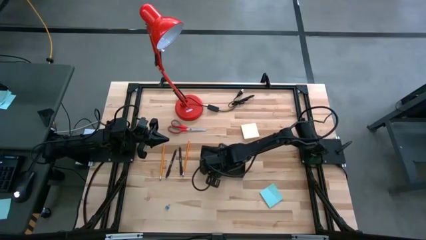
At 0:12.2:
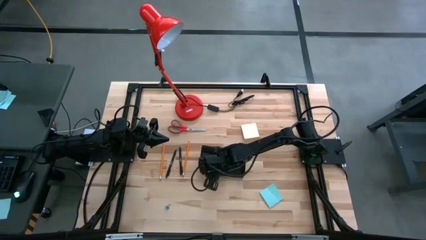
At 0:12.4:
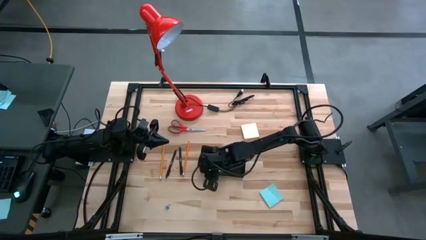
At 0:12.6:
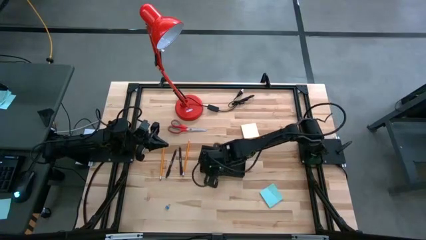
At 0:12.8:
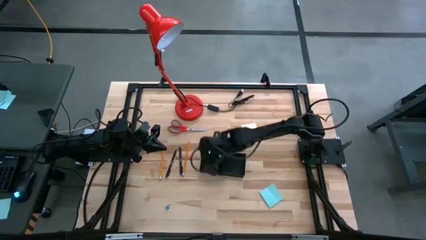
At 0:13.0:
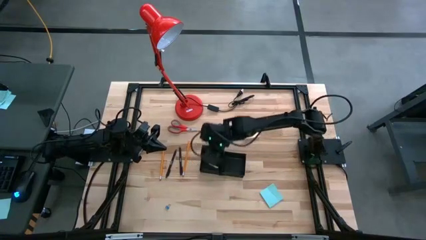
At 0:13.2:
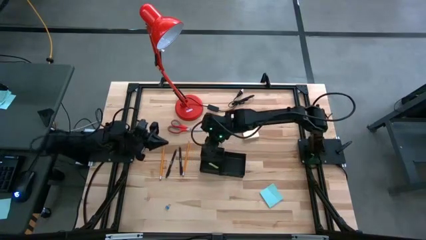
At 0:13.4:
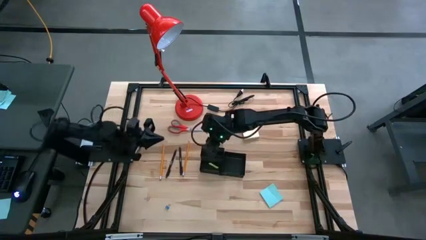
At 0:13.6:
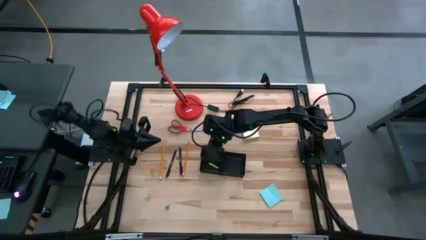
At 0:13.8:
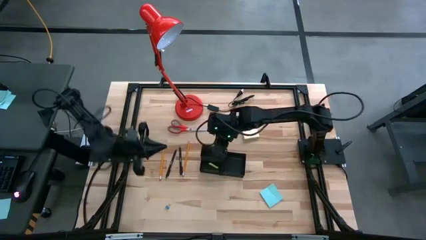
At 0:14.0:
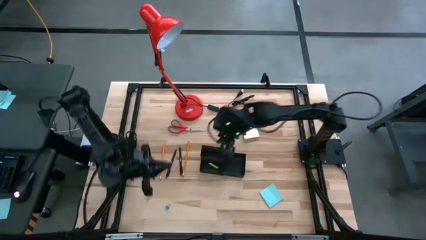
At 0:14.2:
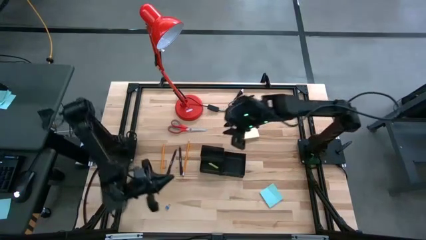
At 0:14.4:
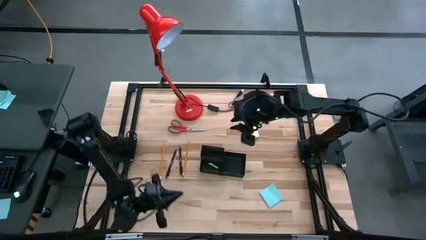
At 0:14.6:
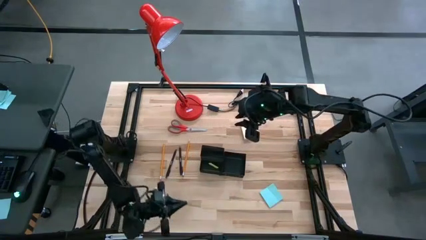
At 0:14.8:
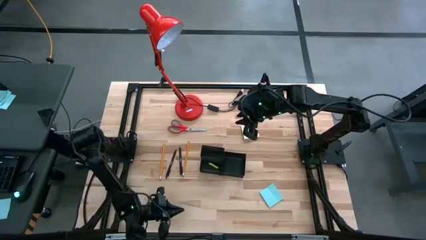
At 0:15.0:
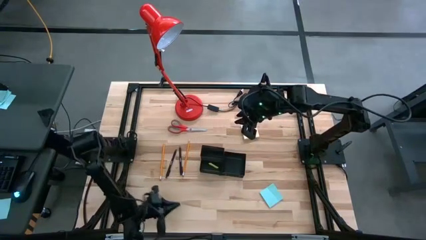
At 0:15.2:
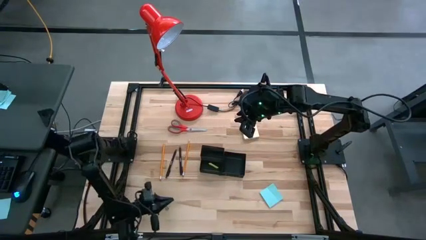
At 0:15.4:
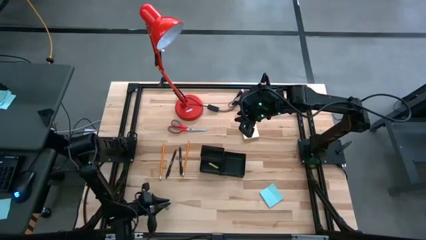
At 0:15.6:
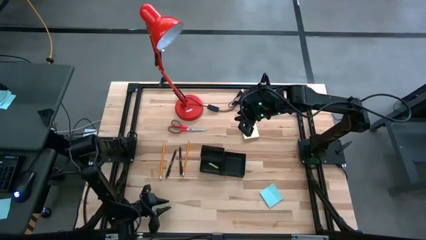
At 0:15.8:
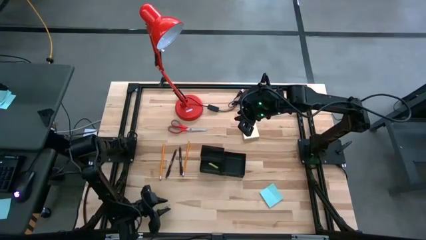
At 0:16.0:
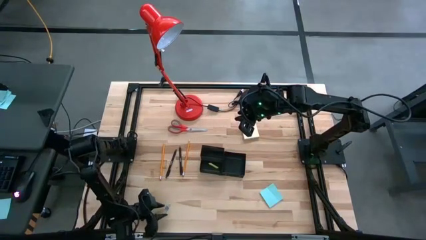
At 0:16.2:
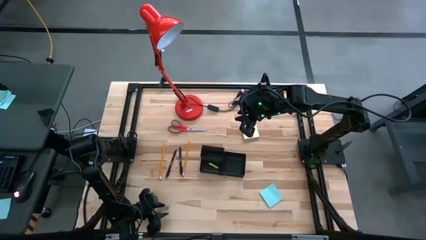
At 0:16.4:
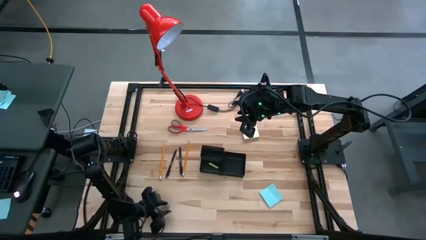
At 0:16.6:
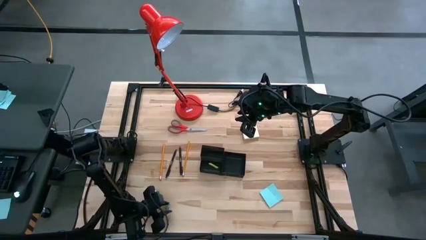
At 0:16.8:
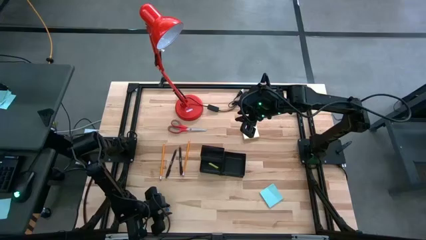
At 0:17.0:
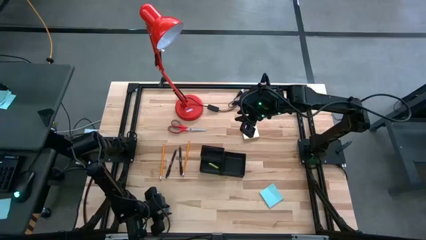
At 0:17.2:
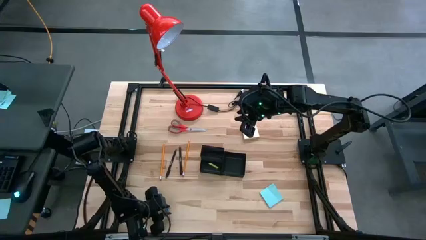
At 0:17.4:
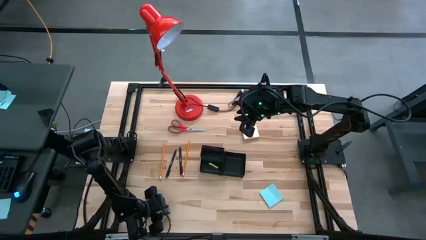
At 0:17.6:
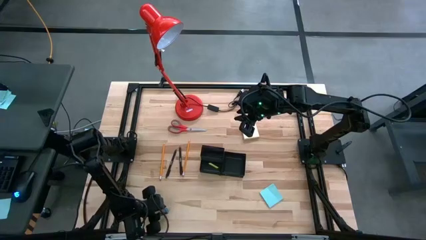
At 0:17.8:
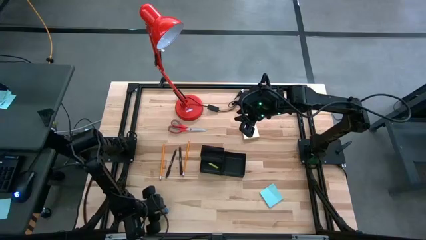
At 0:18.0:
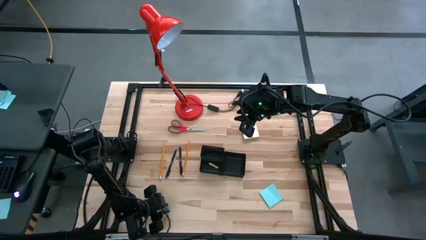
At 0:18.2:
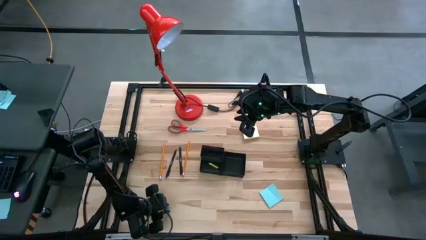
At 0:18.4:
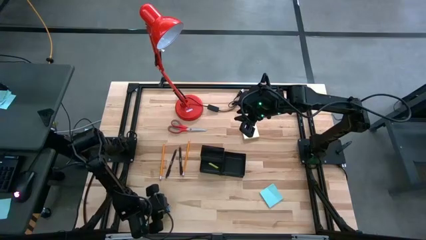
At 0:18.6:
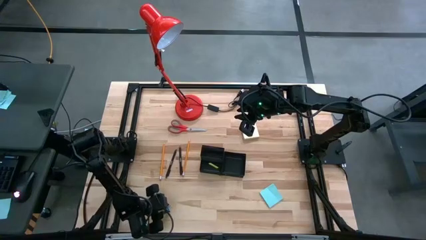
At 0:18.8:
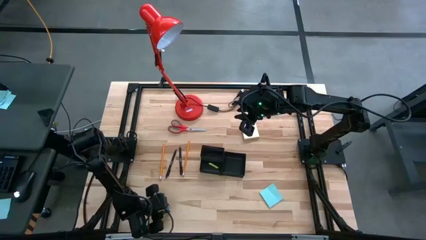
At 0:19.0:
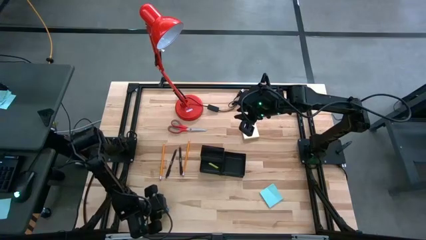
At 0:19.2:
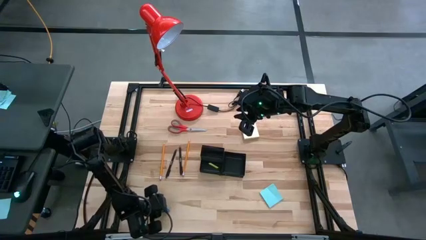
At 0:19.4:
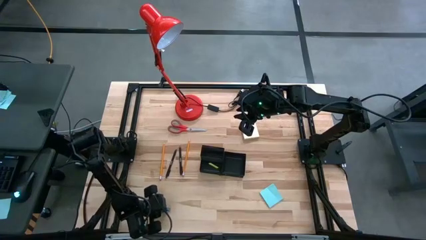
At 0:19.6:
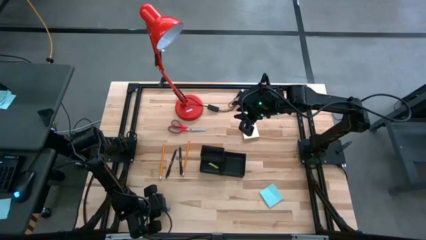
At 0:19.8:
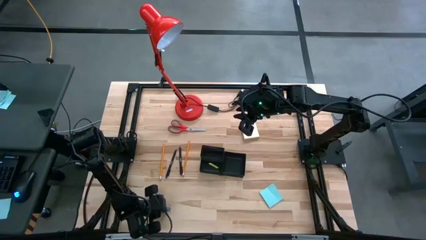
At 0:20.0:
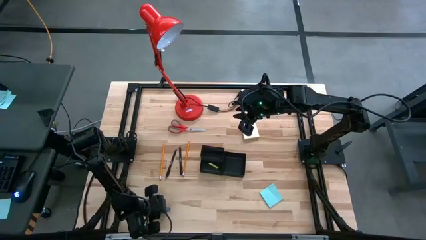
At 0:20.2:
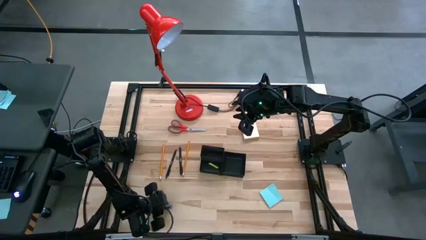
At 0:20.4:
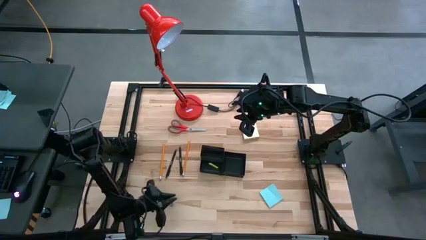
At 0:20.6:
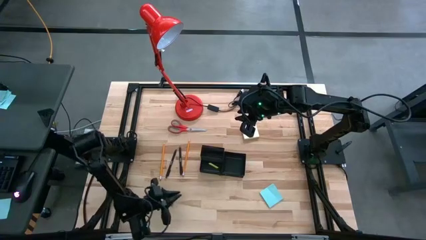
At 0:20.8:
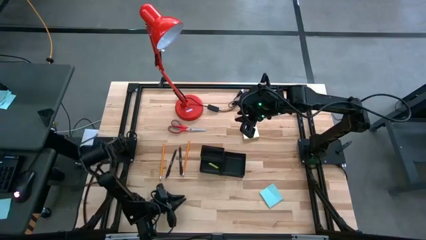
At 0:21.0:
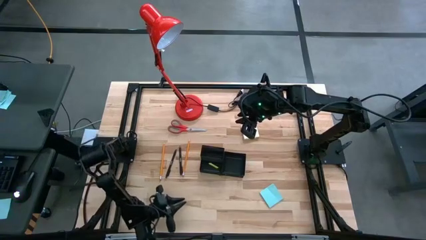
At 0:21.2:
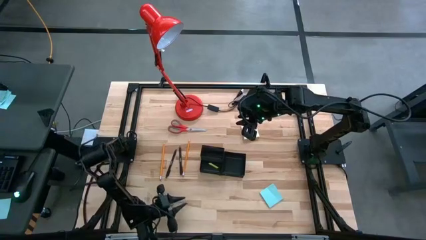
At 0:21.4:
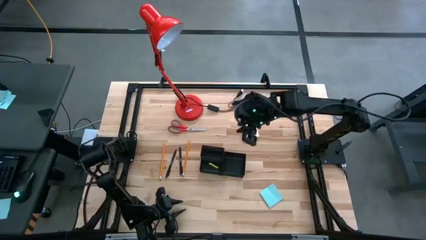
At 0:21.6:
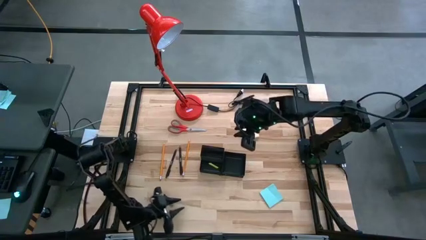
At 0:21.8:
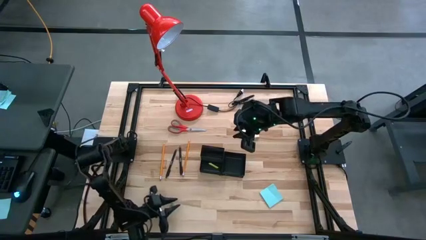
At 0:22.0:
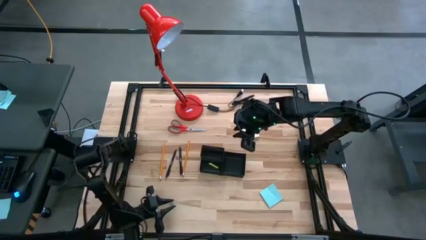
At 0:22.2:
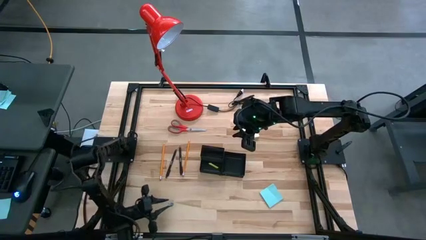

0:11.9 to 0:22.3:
Task: Pick and place office supplies into organizer
Put the blue binder clip into the black desk organizer
